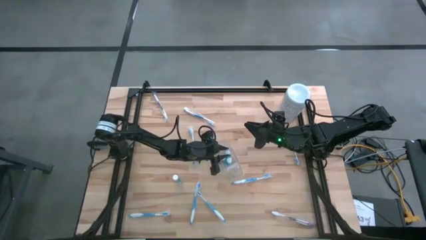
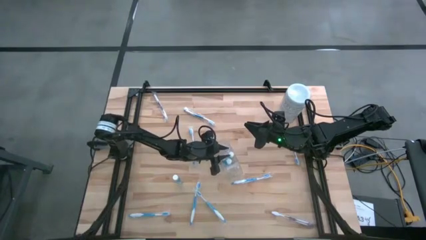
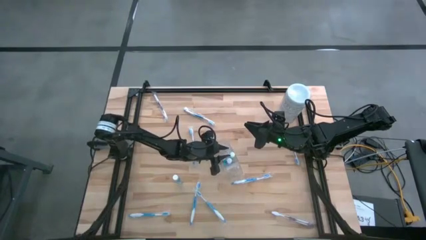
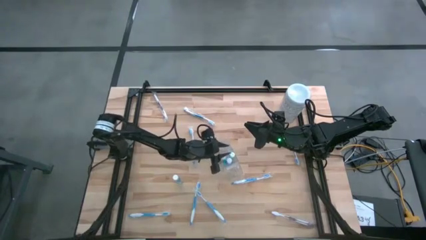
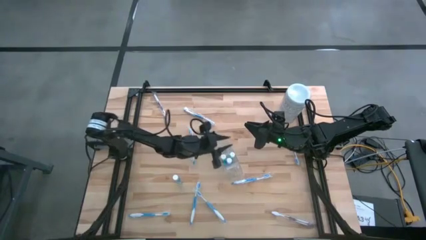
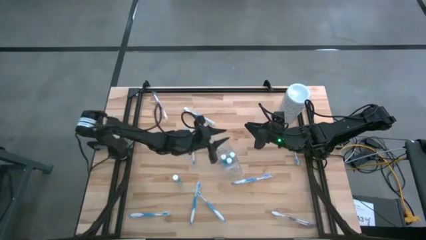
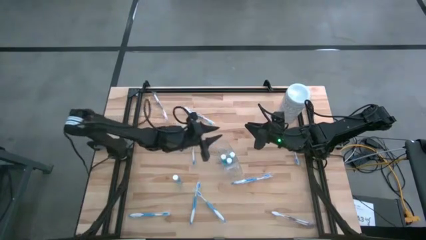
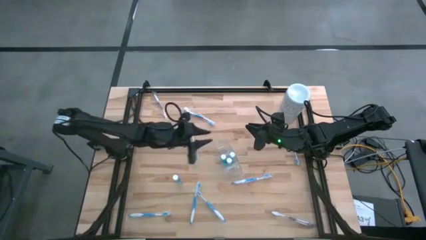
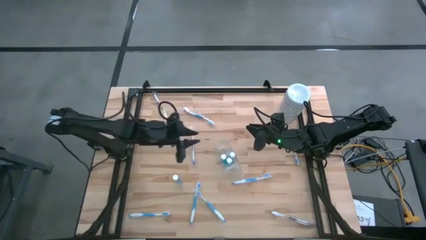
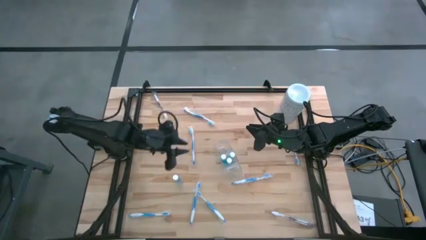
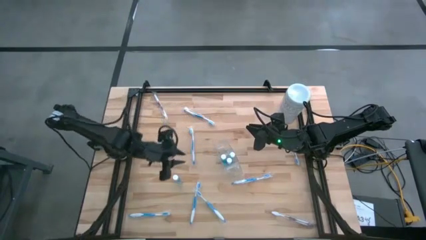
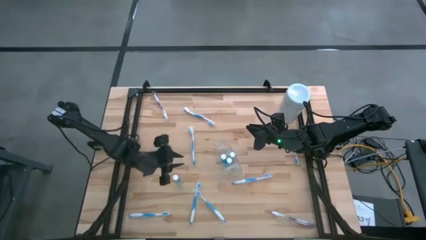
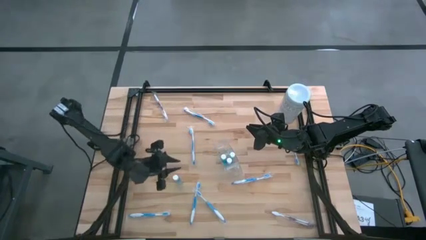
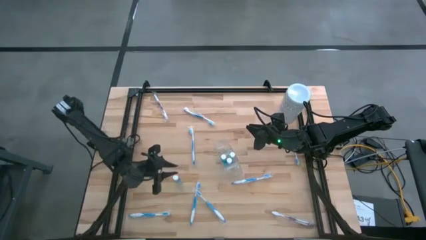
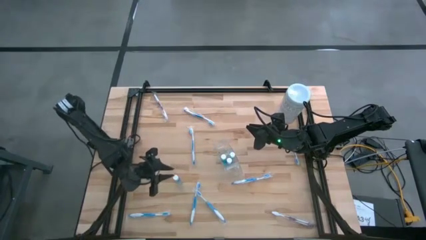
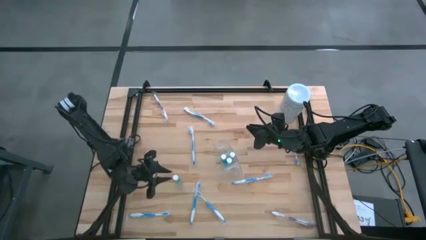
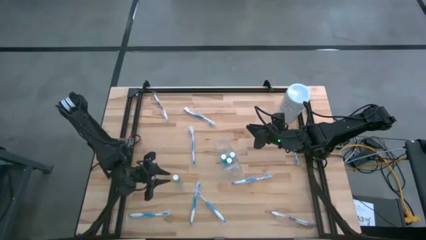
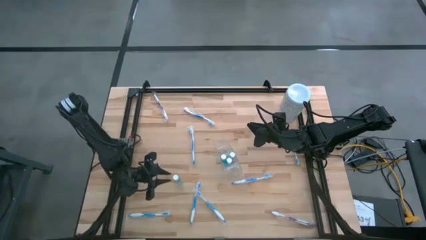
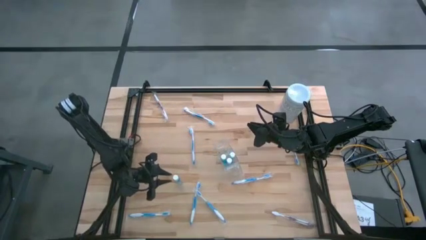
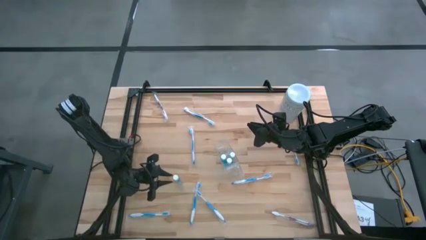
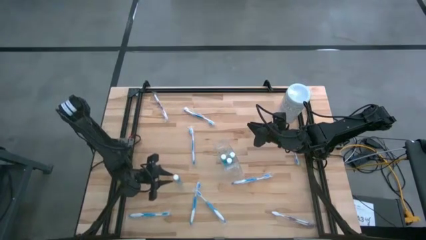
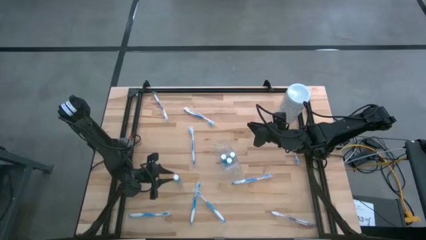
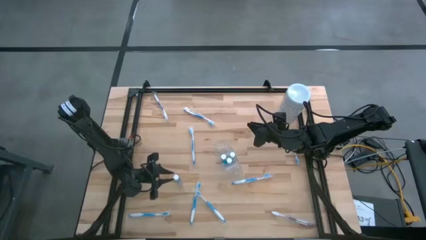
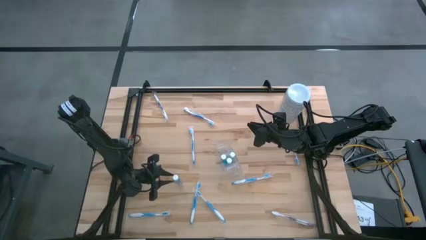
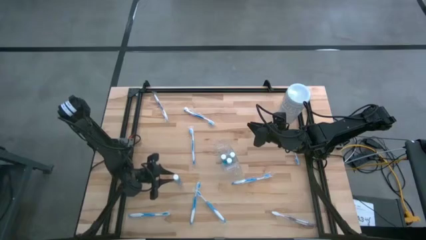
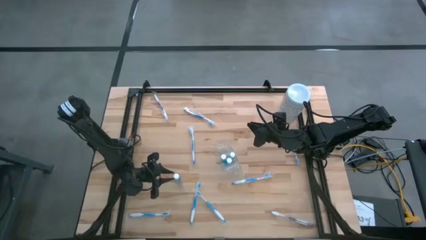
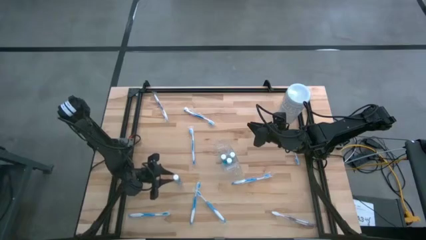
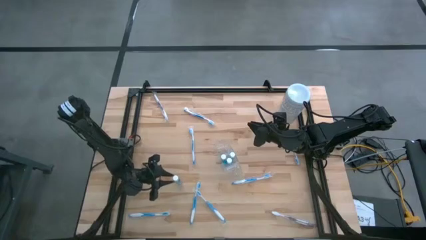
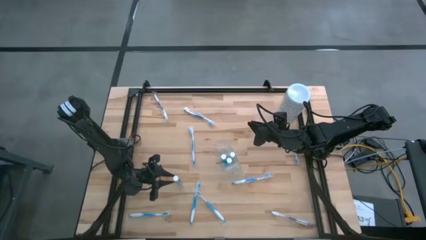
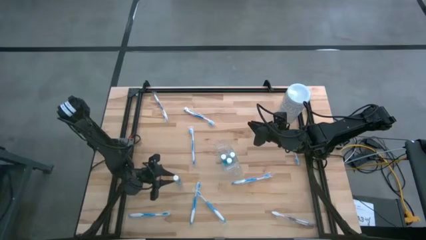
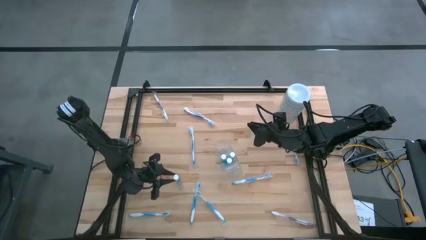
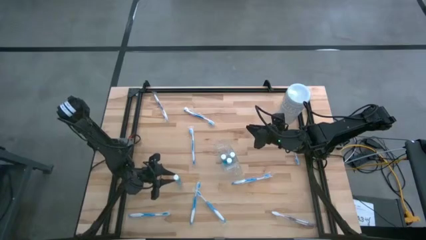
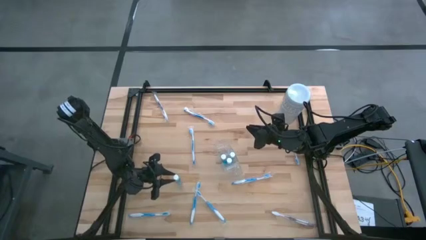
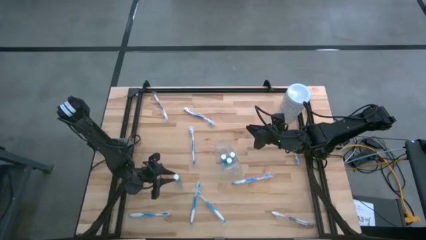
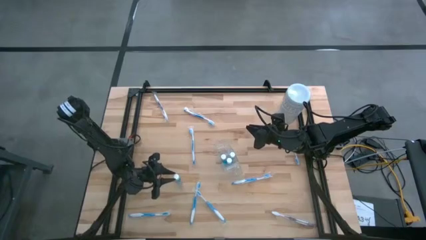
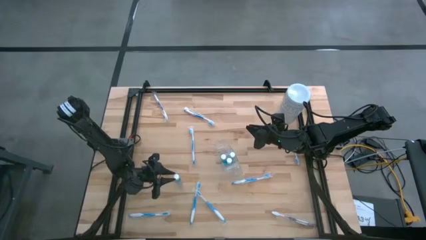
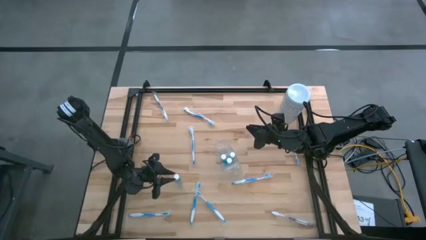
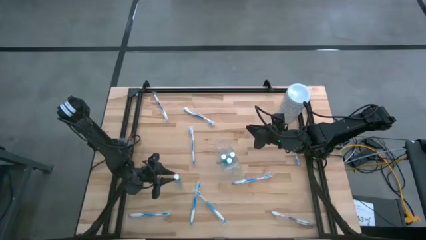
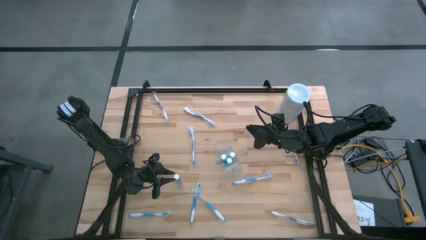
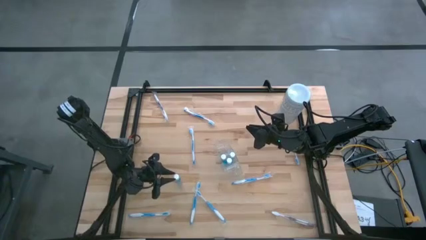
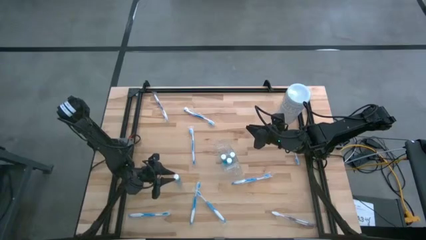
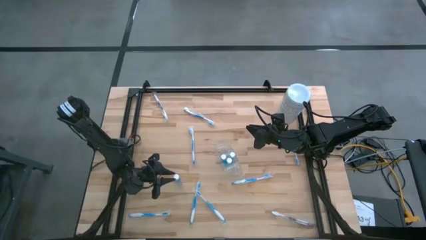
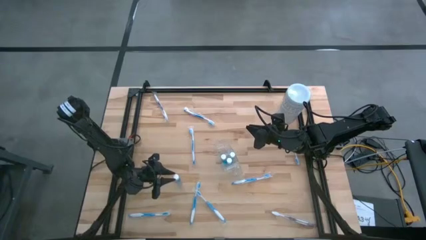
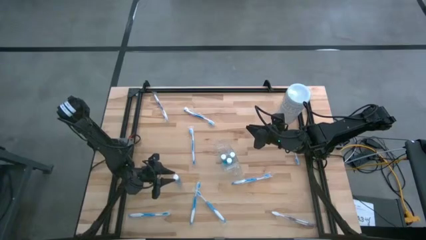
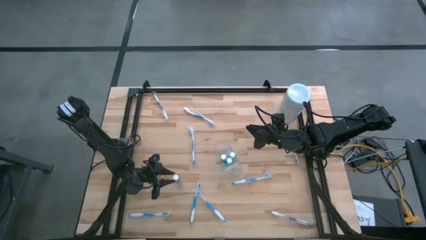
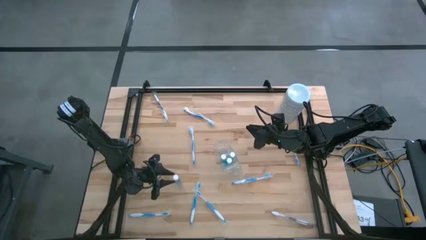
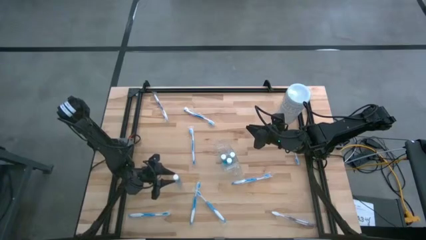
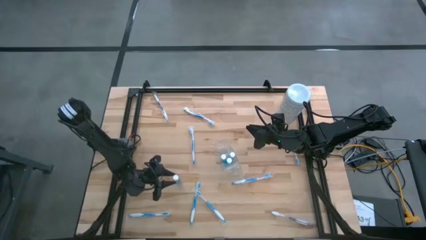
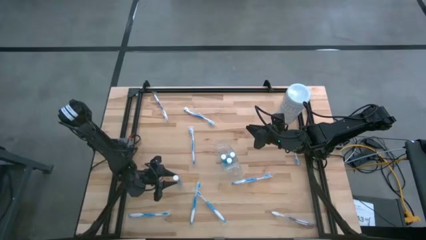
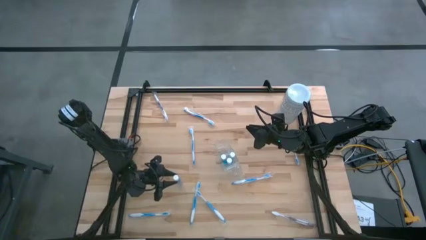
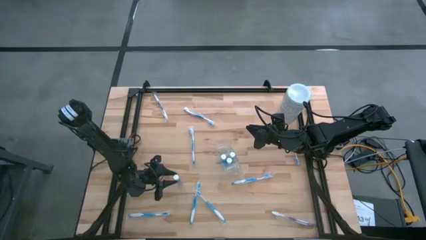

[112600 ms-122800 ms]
Task: Pick & Place toothbrushing station
Put the blue mouthwash into the middle section of the transparent organizer

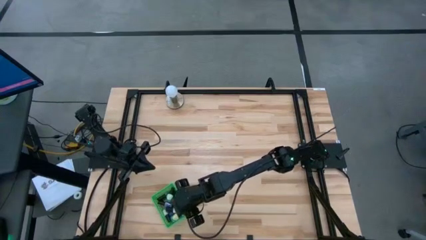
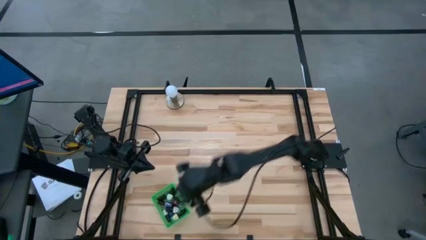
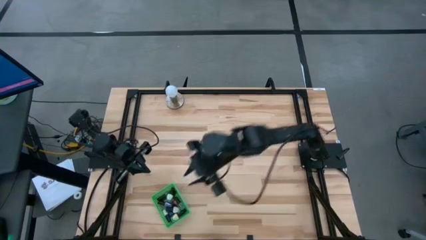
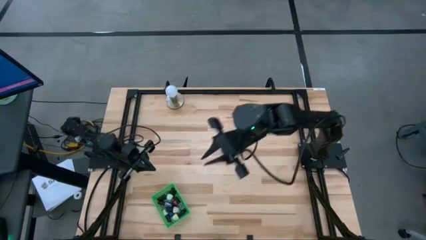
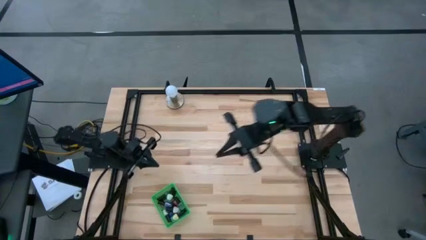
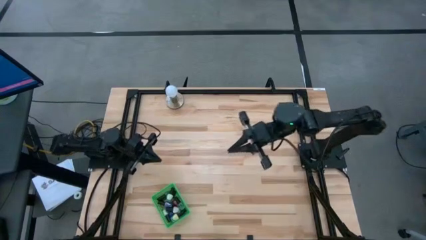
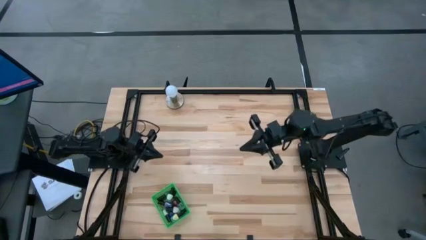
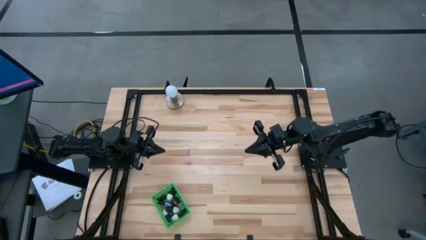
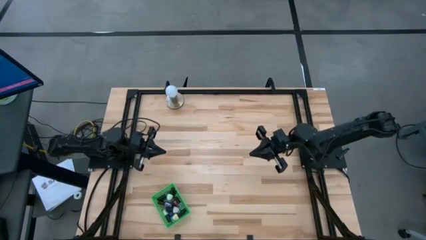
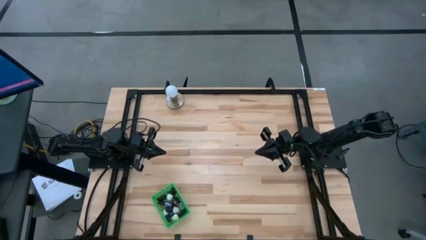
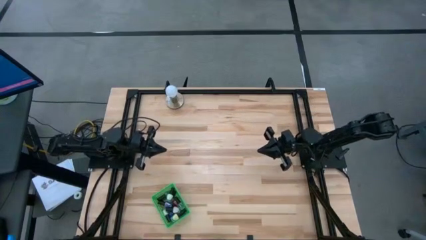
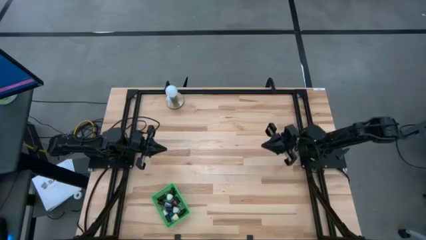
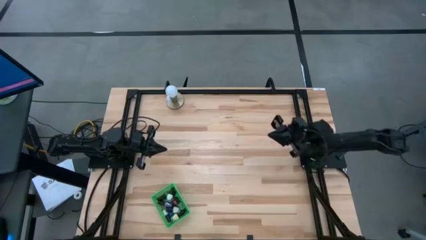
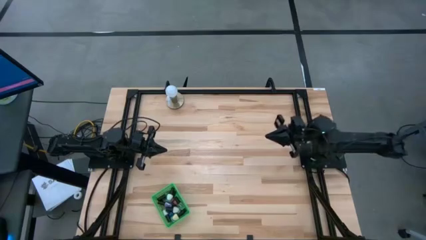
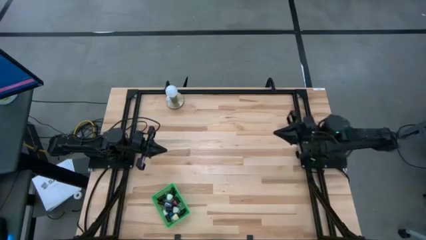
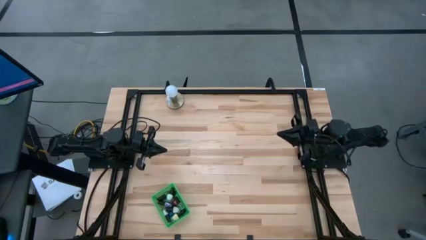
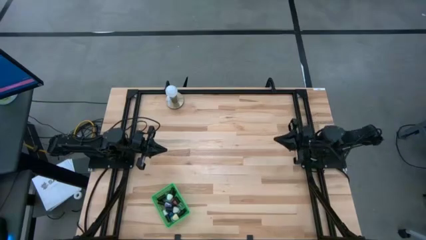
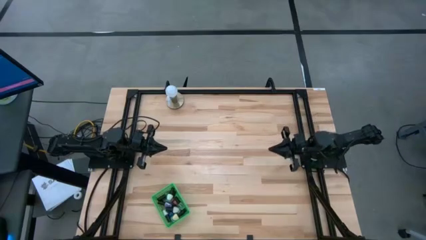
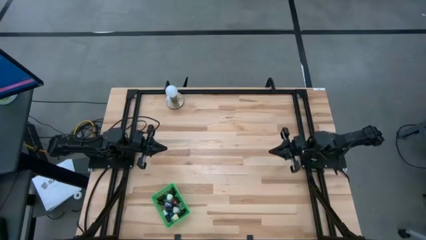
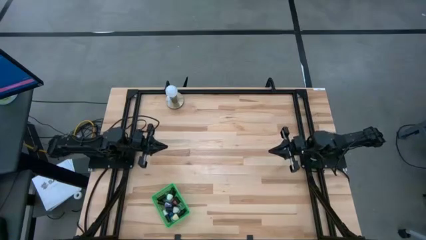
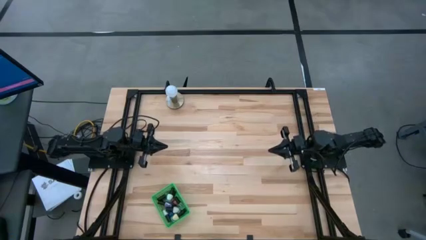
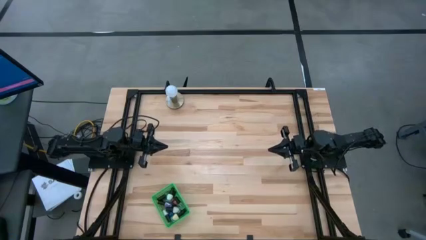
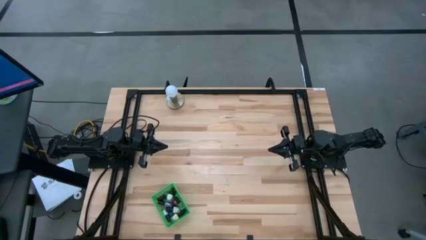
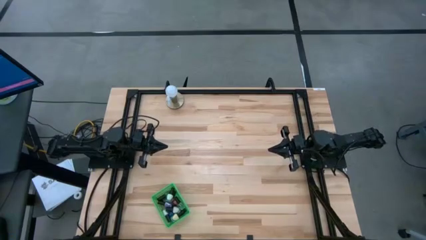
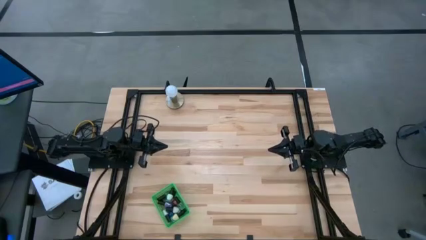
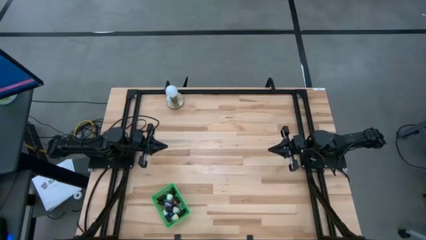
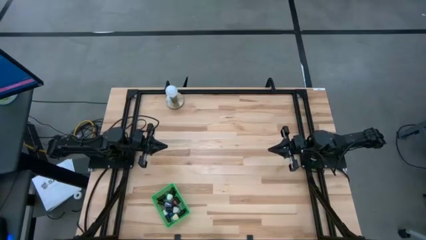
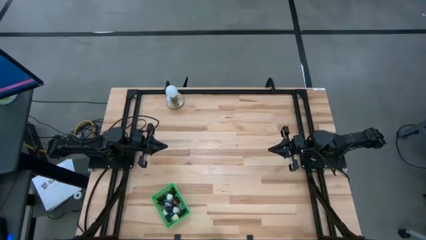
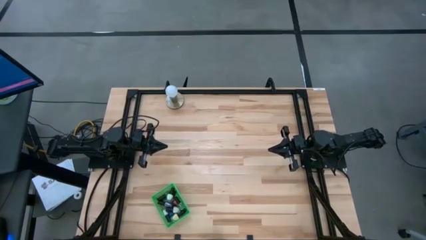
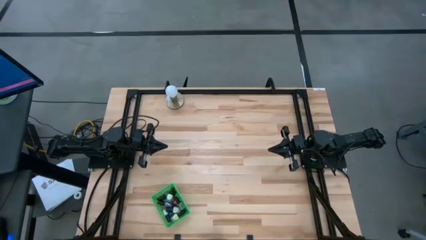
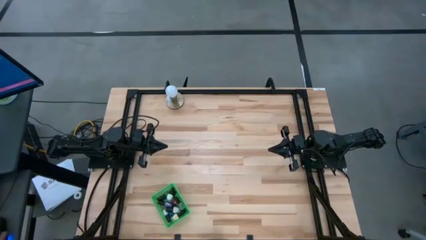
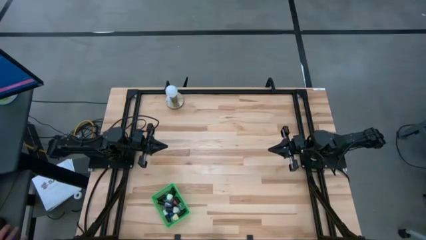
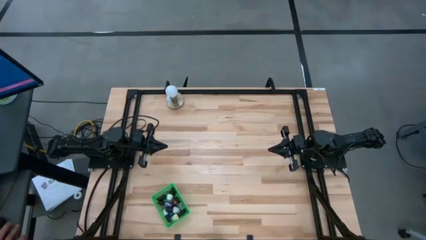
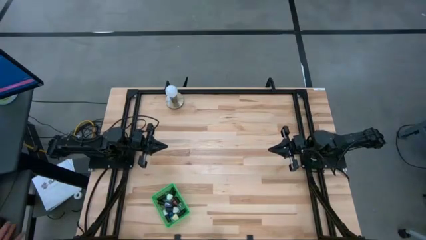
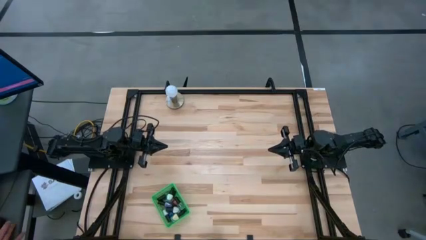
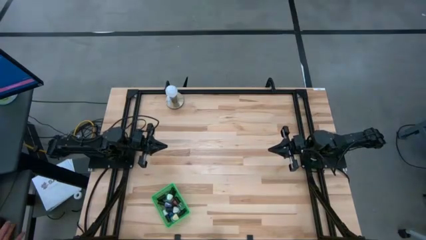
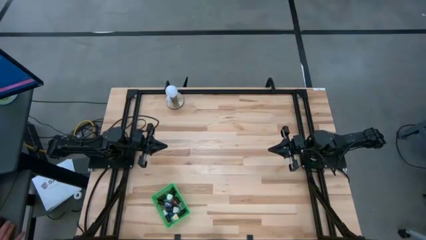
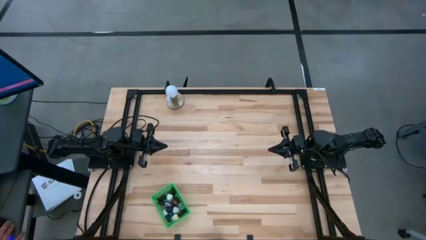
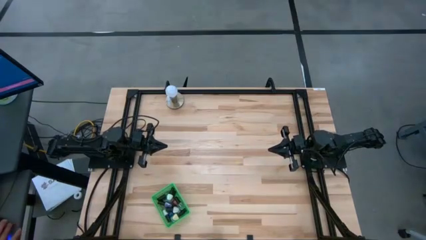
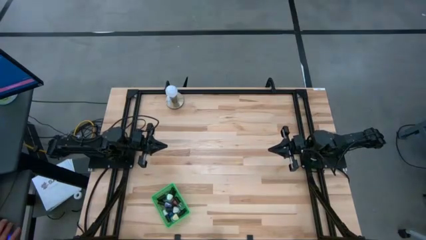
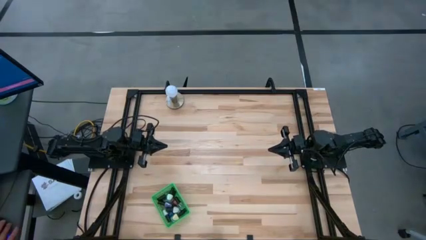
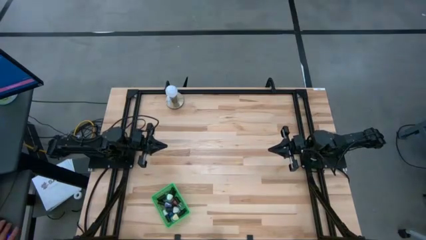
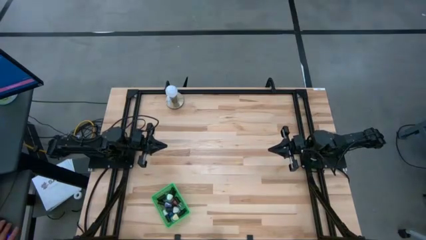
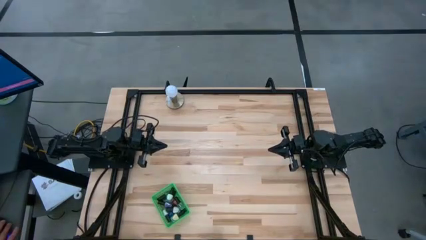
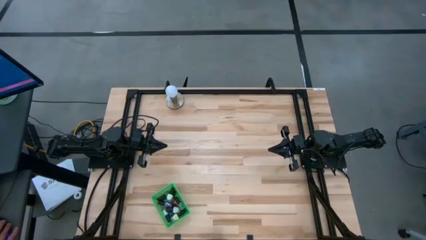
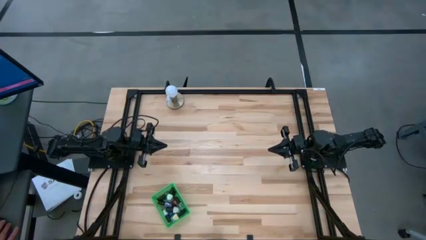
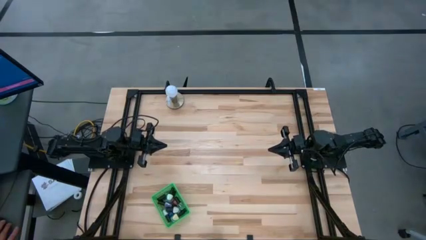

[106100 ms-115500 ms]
Task: Pick & Place Nail Polish
Return to Home Position
